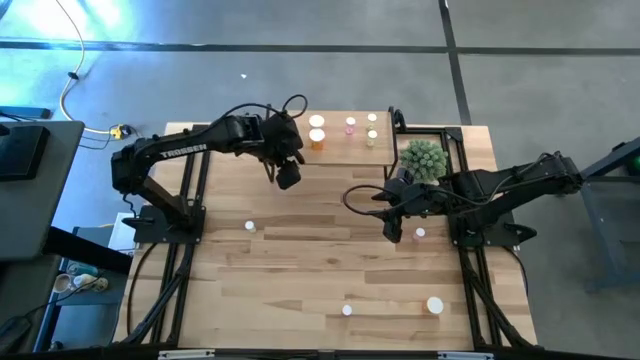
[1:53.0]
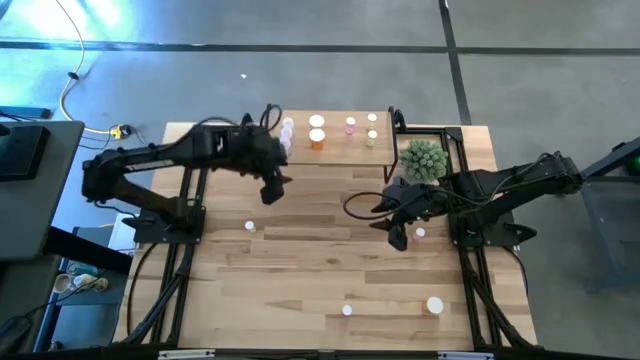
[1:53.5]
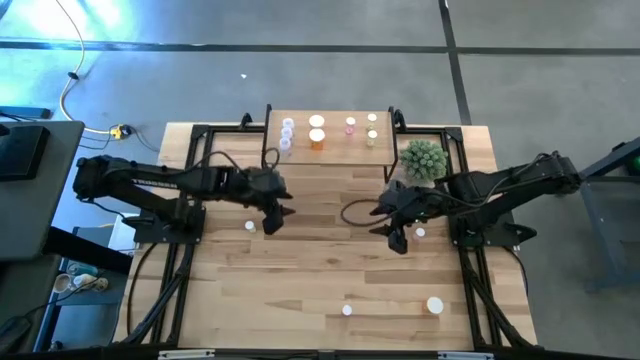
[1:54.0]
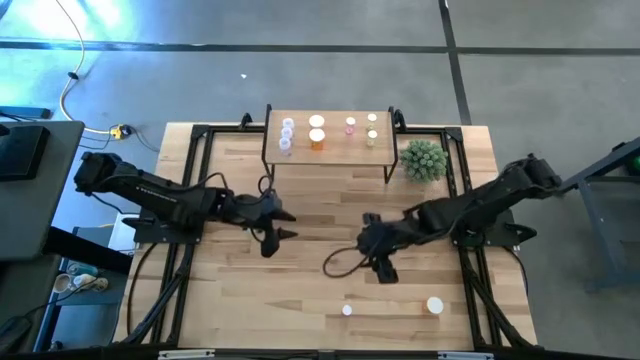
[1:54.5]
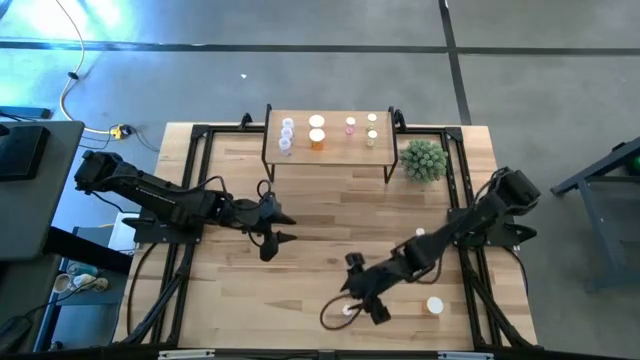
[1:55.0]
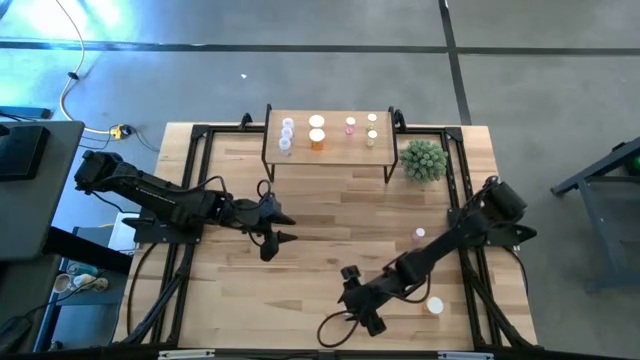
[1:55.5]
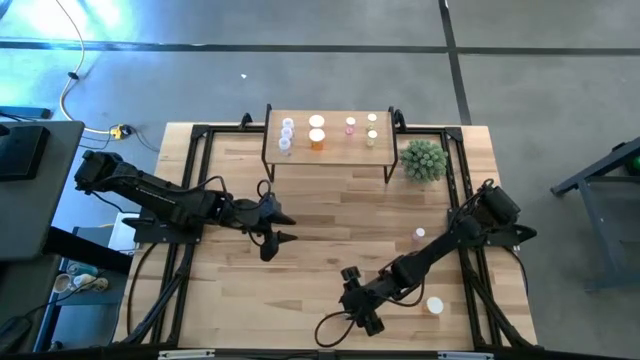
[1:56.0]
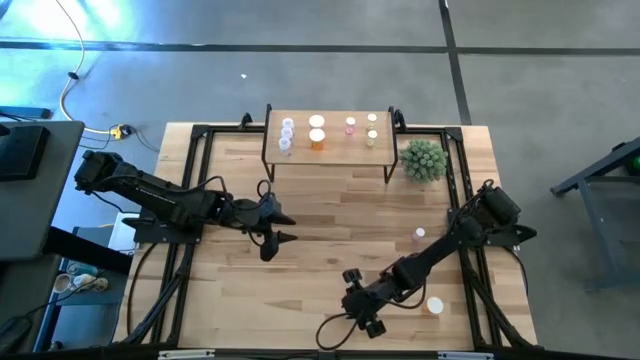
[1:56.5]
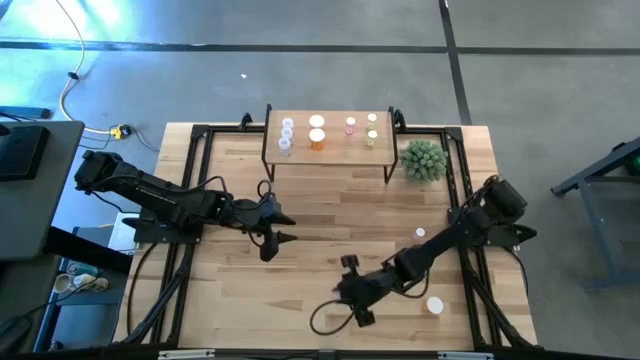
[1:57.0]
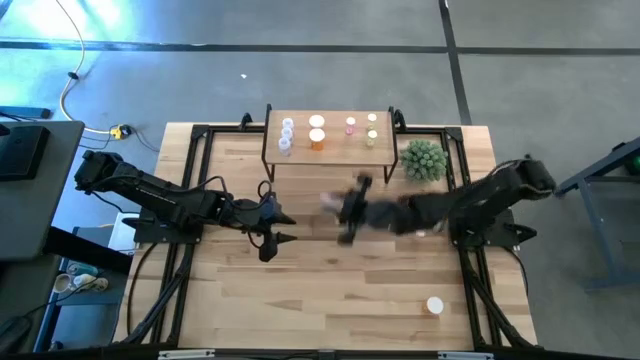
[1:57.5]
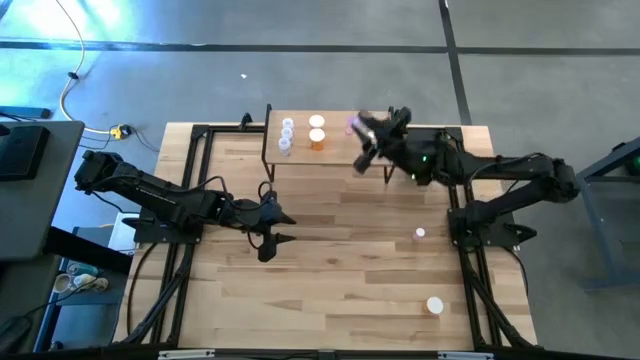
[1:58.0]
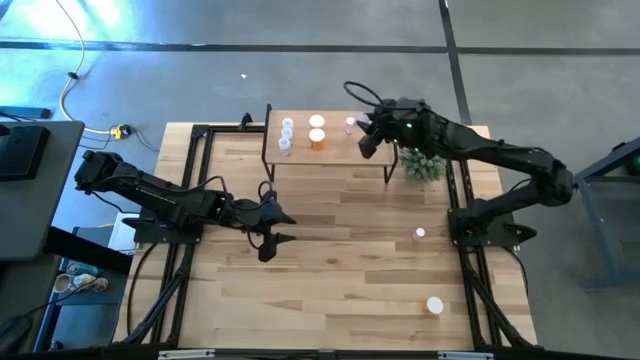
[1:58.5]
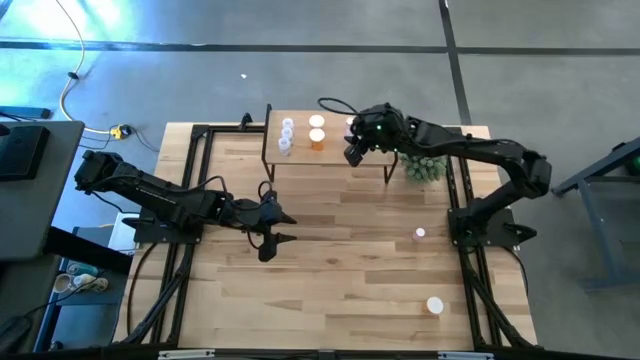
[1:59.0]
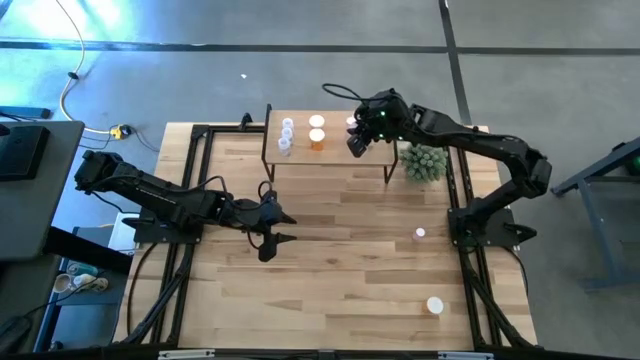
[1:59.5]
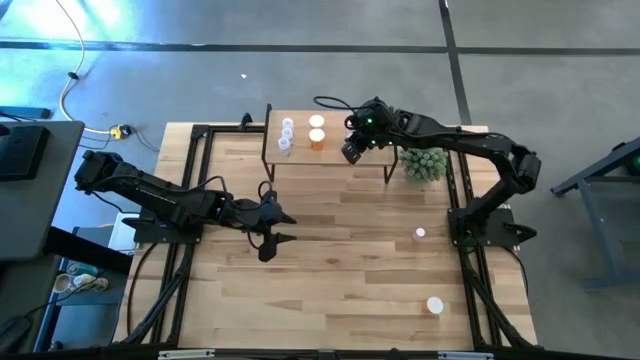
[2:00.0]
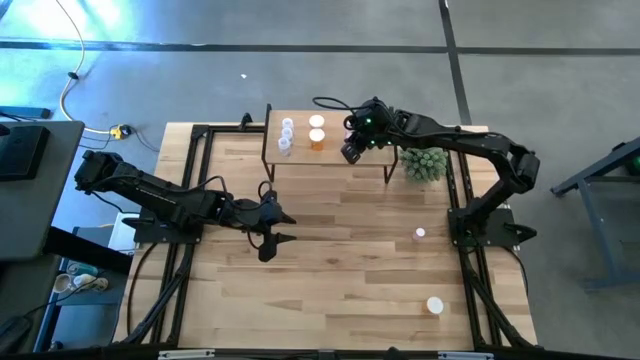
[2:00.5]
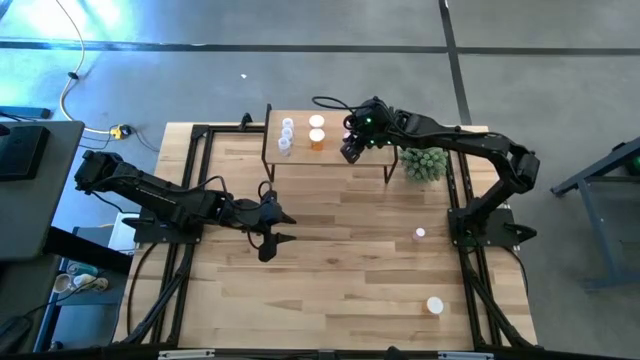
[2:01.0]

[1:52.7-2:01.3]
Task: Pick and place medicine bottles onto shelf by color
Put the bottom pink pill bottle aligned with the other pink pill bottle on the shelf

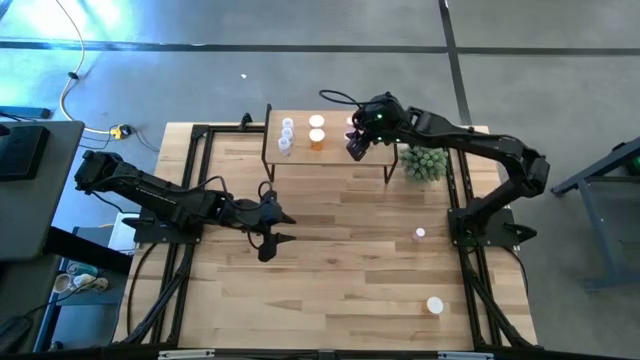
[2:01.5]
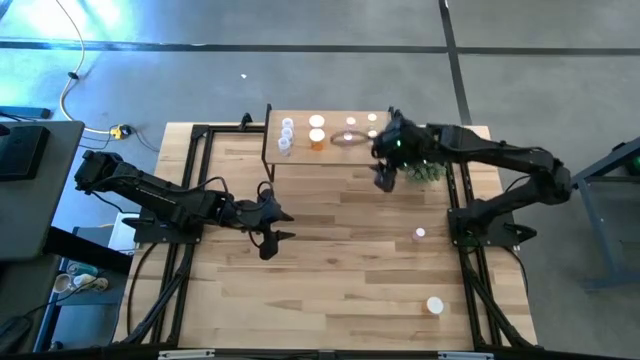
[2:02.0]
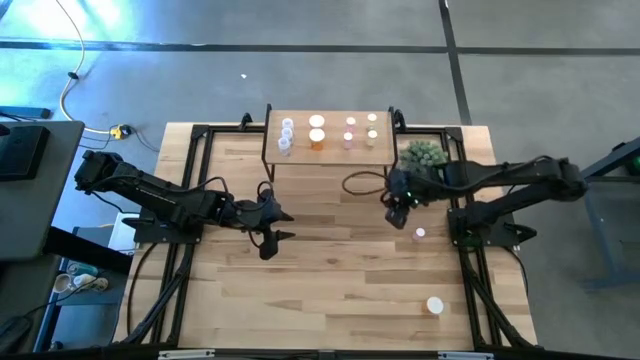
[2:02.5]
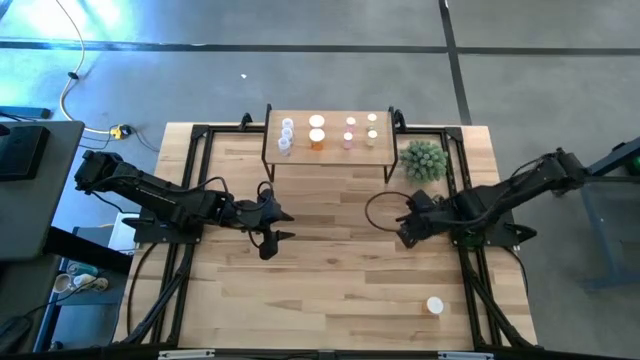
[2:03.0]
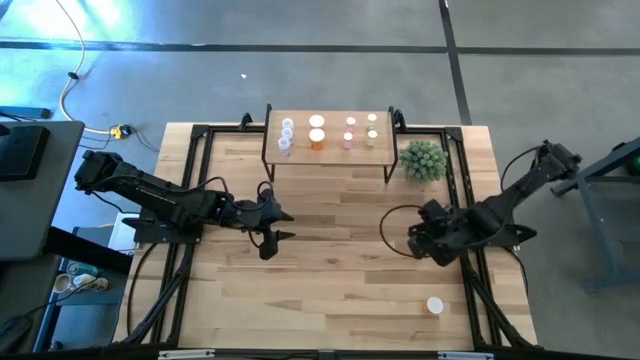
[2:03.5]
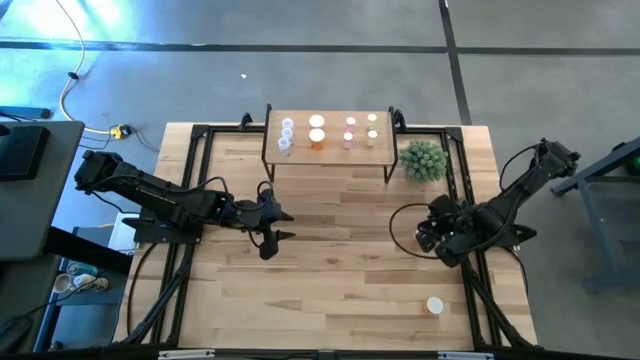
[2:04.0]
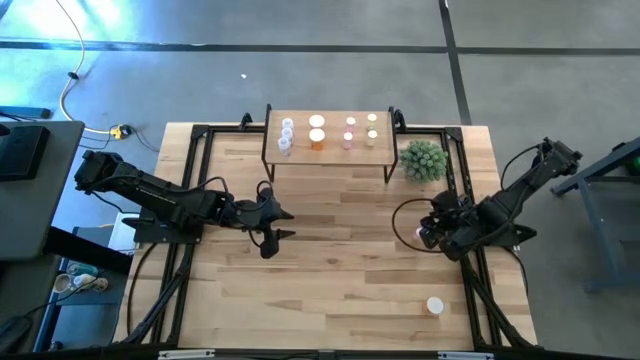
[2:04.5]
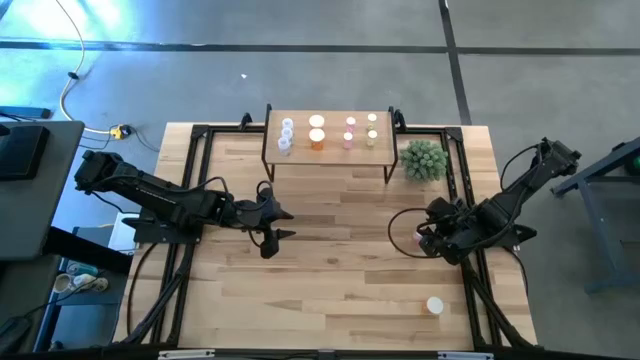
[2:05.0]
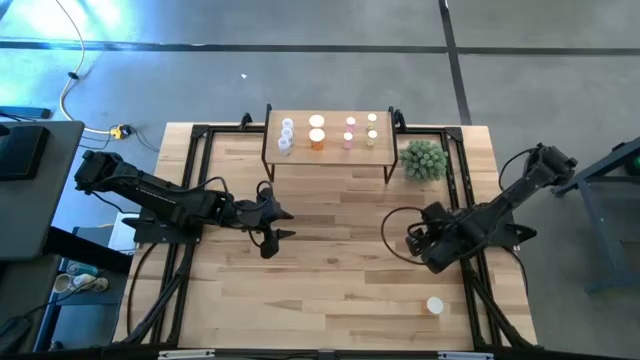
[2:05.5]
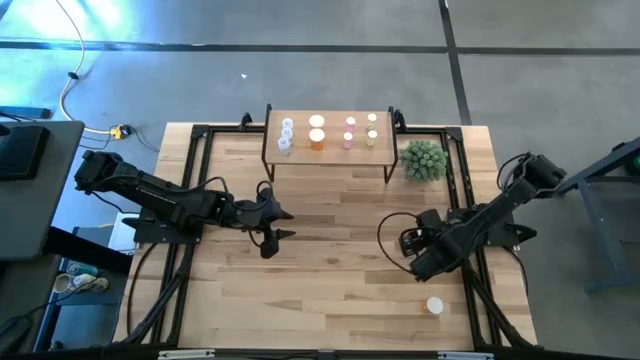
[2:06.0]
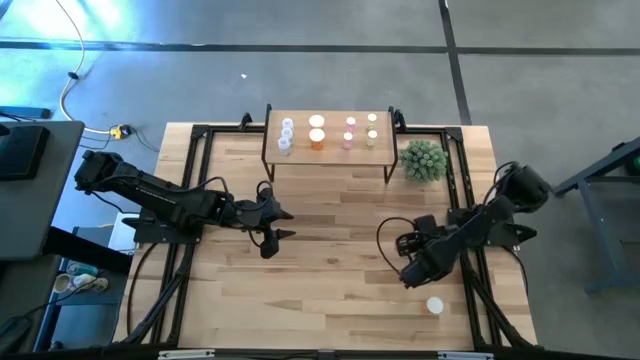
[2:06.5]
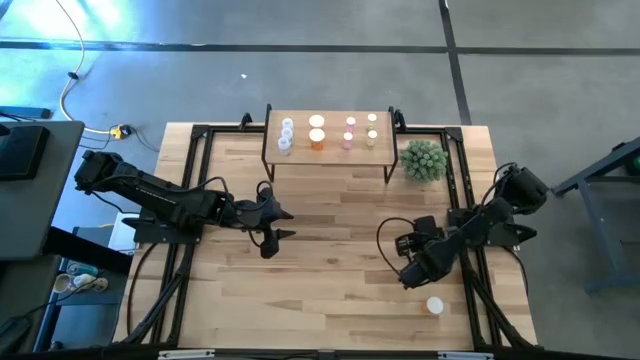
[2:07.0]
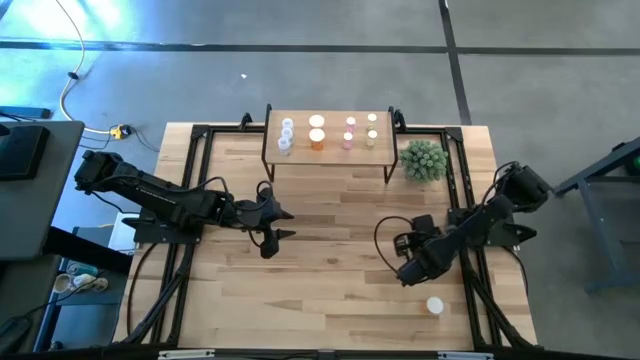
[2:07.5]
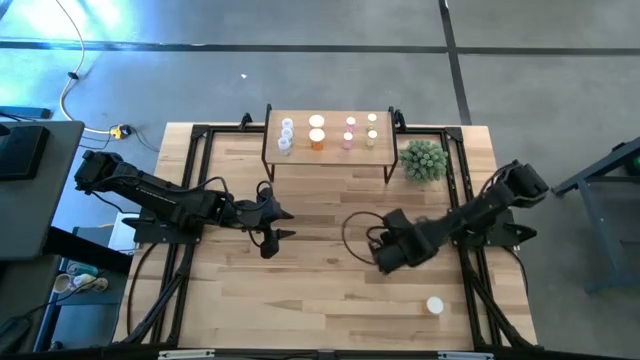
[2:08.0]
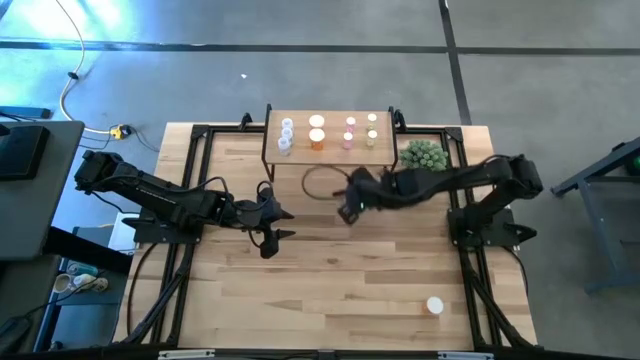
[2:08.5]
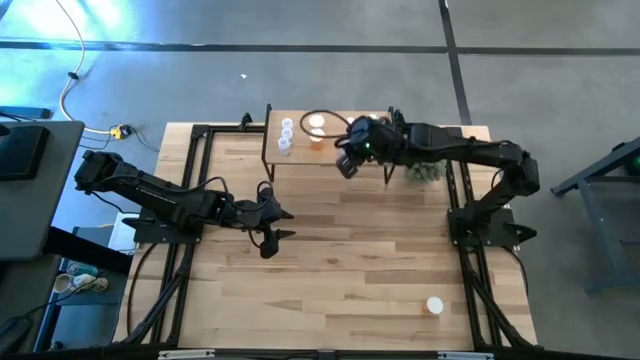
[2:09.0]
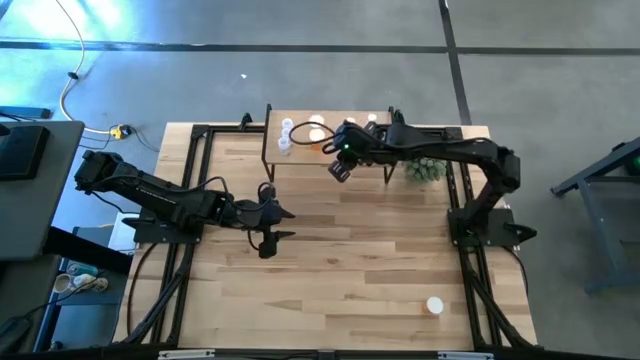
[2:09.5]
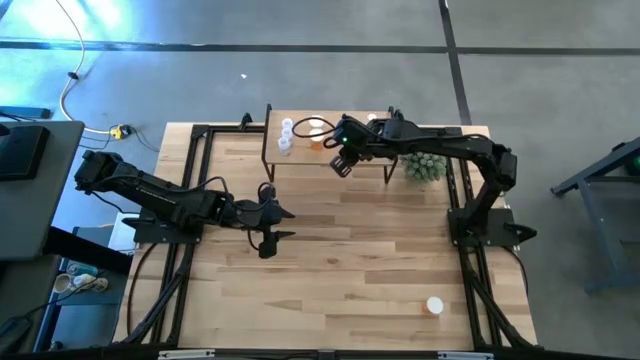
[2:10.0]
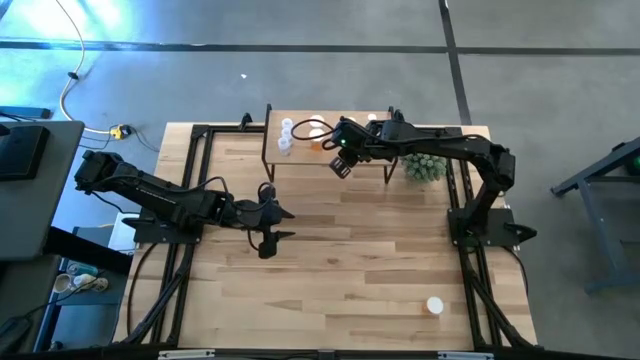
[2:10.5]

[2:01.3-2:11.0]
Put the pink pill bottle aligned with the other pink pill bottles on the shelf

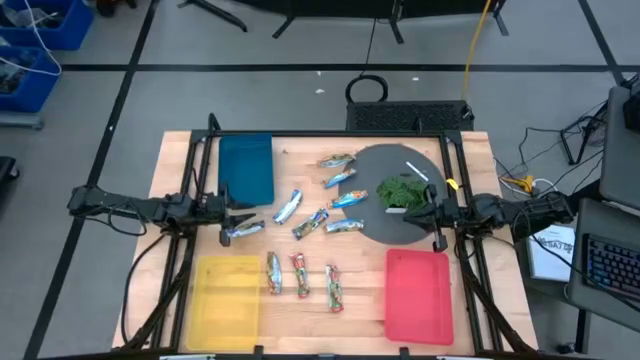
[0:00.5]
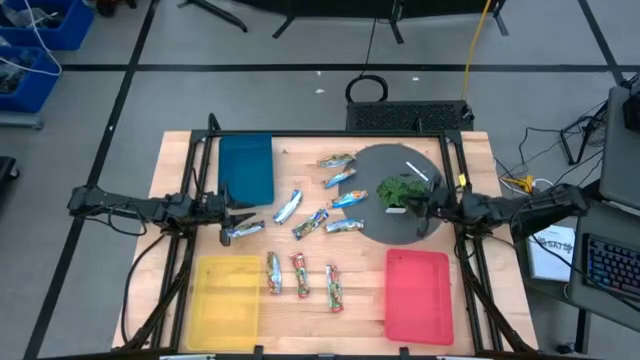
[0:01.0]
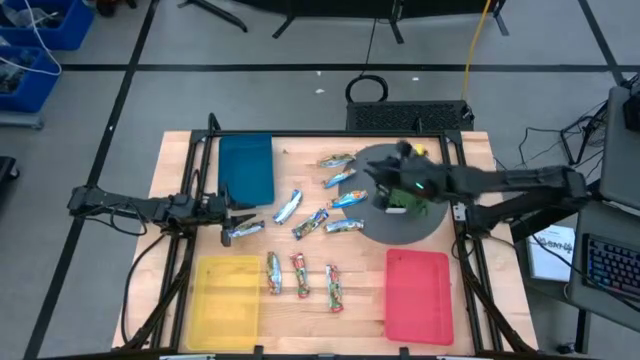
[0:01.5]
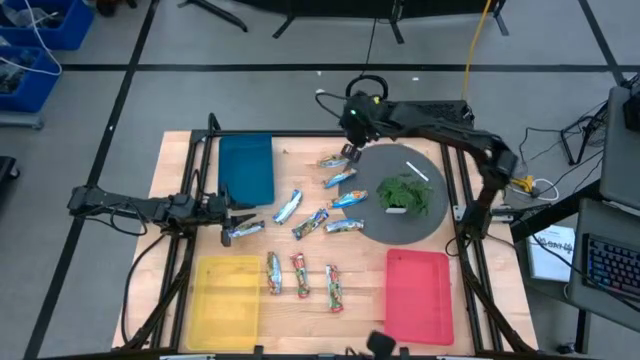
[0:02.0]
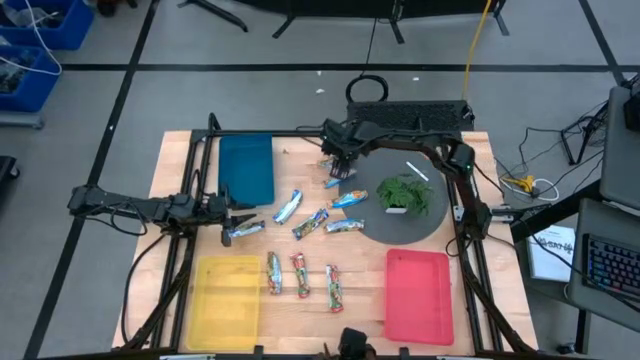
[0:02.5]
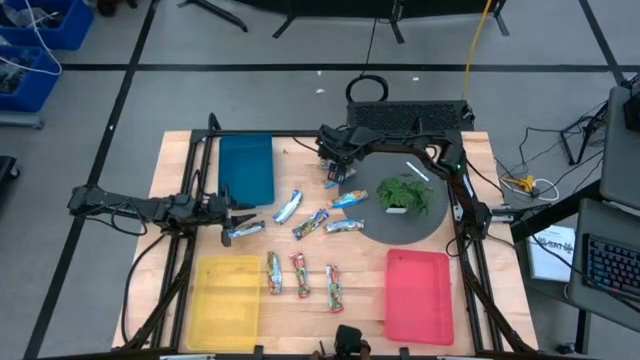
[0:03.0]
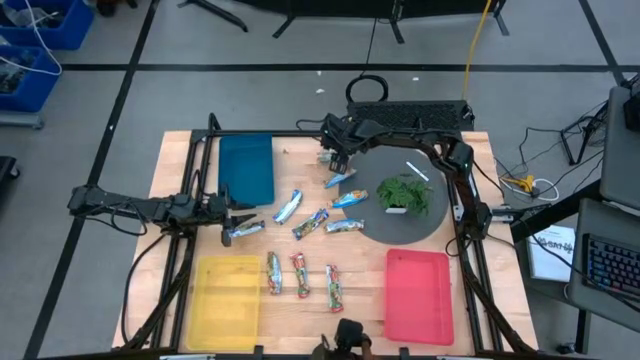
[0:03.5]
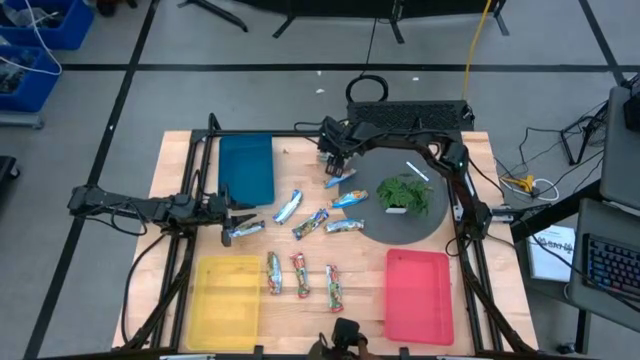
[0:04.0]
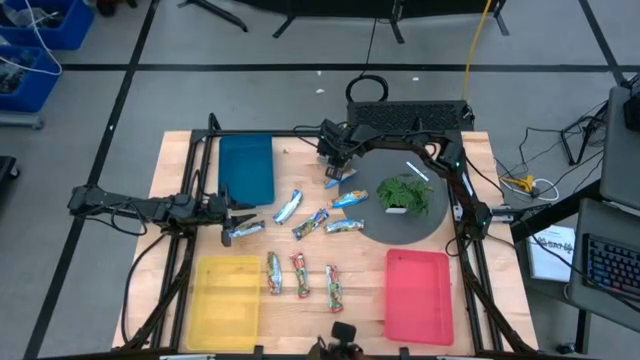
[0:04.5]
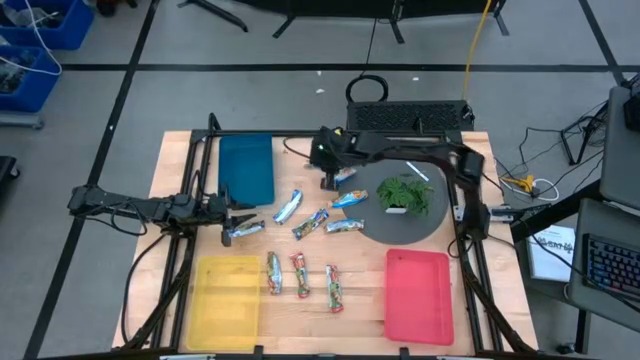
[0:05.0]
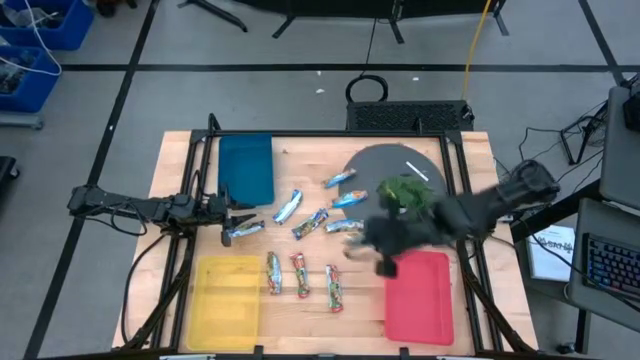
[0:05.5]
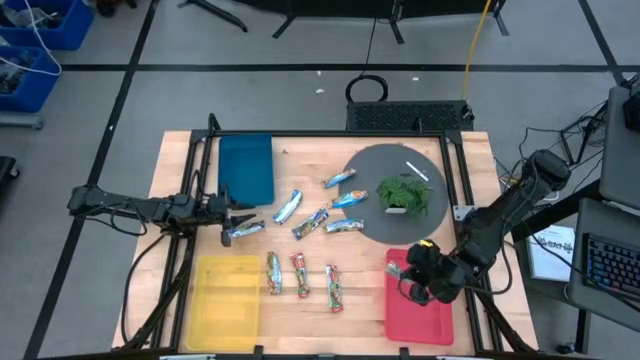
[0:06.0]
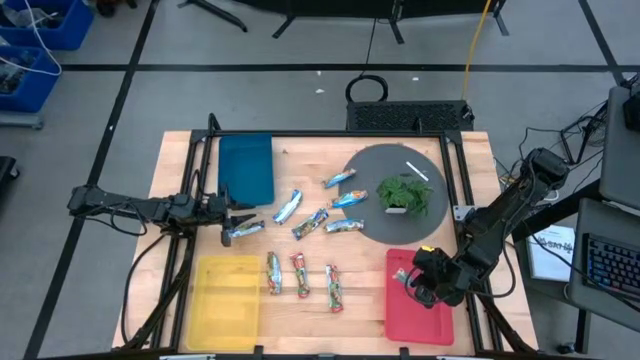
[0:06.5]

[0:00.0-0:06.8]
Task: Pick and place Granola Bars by type
Put the yellow granola bar into the pink bin
